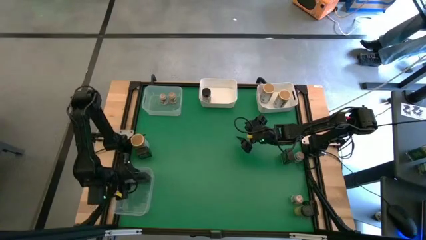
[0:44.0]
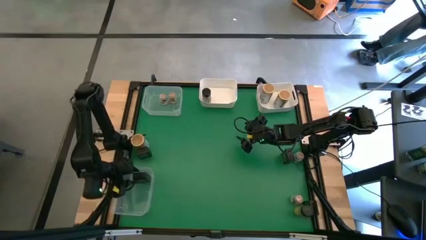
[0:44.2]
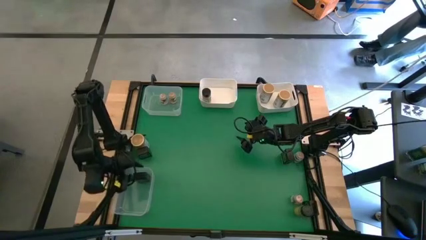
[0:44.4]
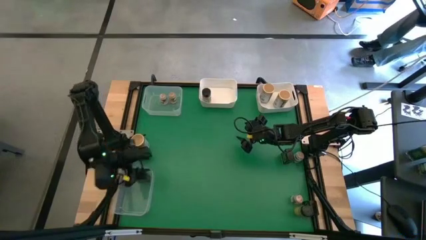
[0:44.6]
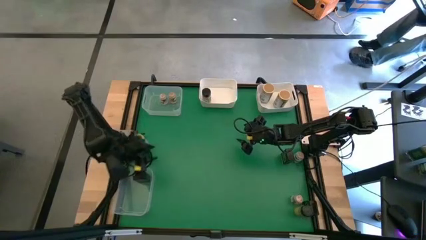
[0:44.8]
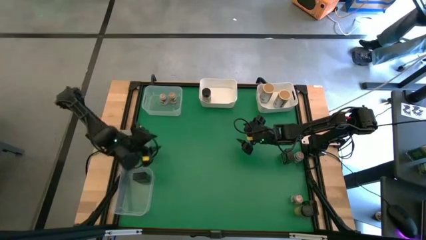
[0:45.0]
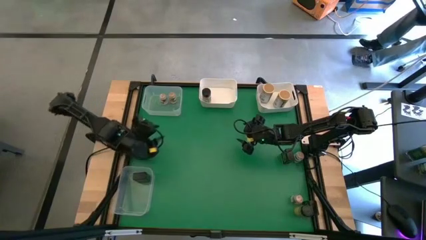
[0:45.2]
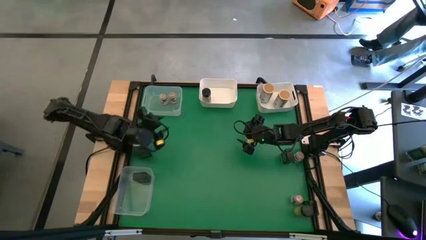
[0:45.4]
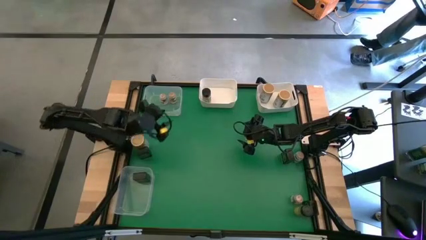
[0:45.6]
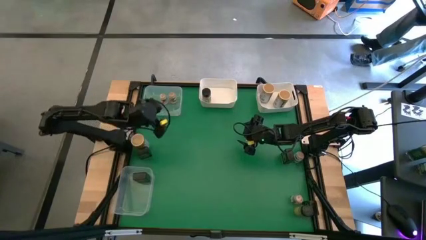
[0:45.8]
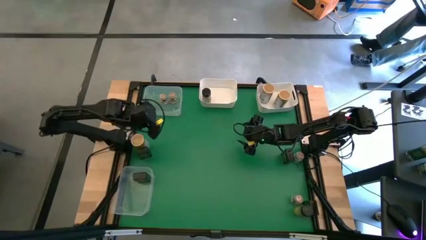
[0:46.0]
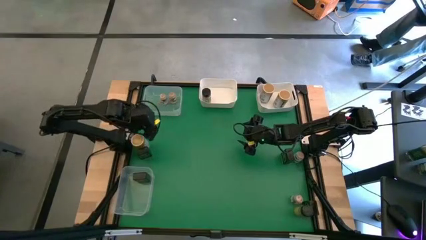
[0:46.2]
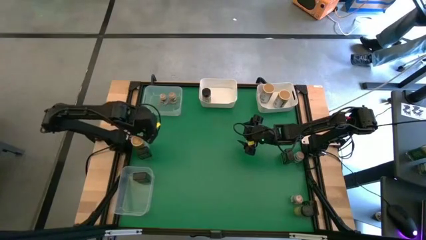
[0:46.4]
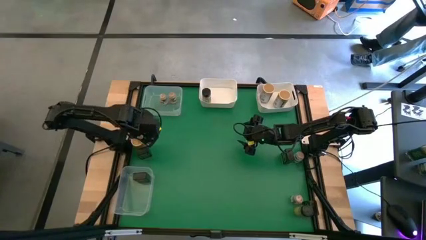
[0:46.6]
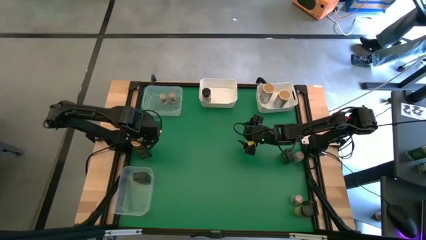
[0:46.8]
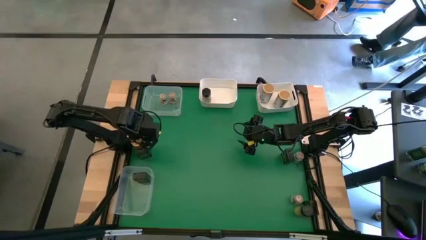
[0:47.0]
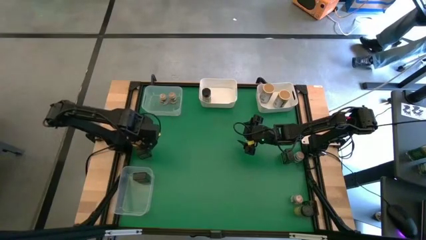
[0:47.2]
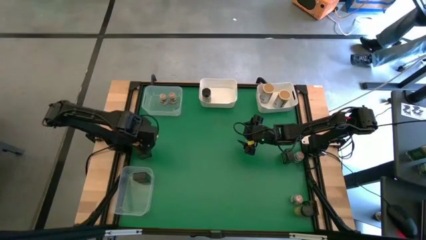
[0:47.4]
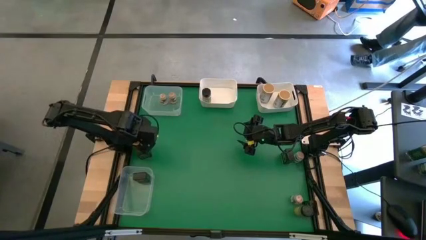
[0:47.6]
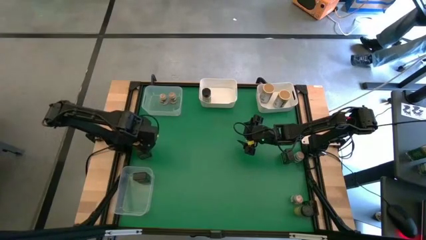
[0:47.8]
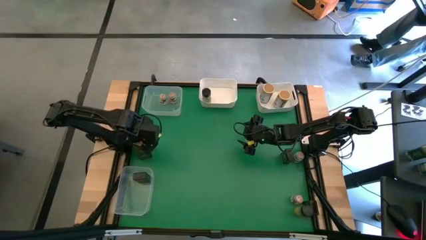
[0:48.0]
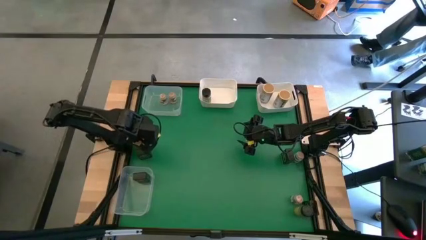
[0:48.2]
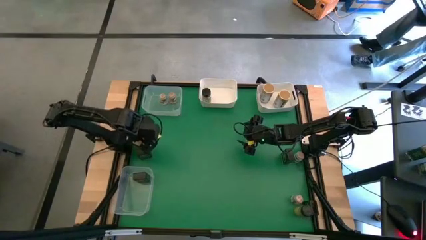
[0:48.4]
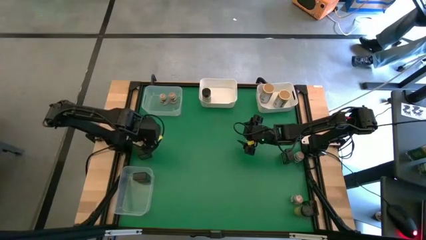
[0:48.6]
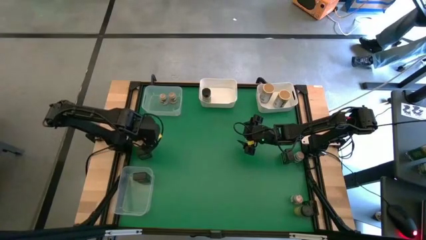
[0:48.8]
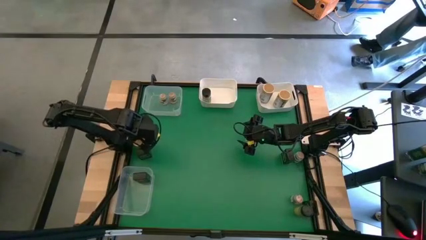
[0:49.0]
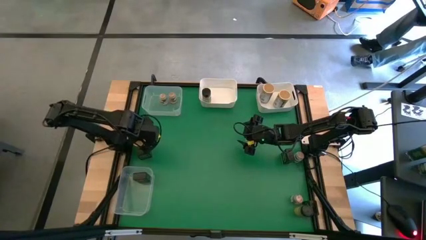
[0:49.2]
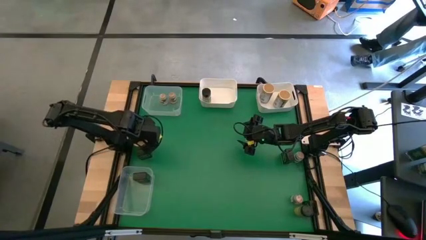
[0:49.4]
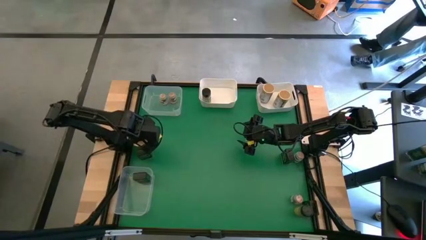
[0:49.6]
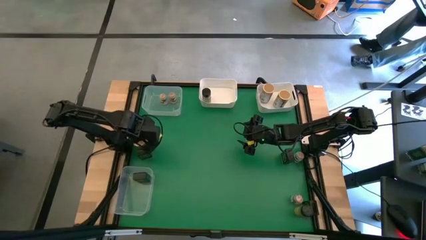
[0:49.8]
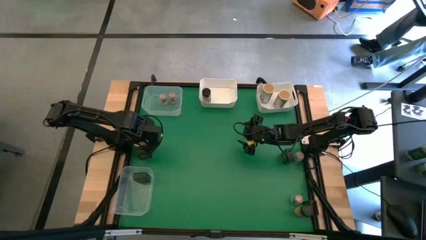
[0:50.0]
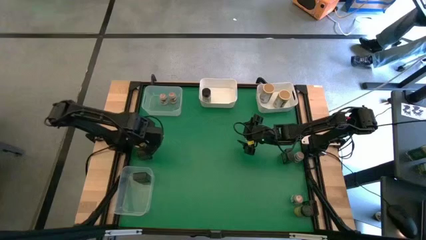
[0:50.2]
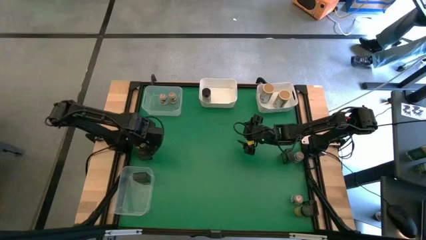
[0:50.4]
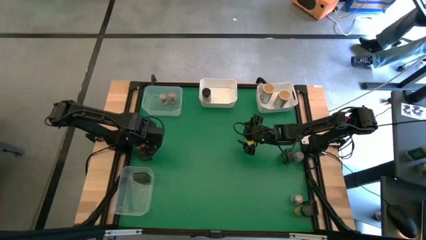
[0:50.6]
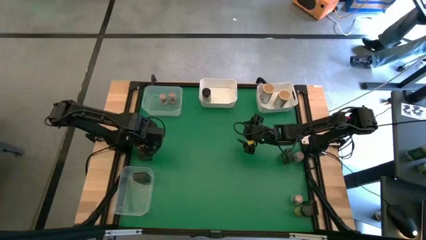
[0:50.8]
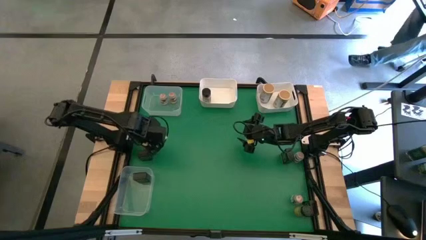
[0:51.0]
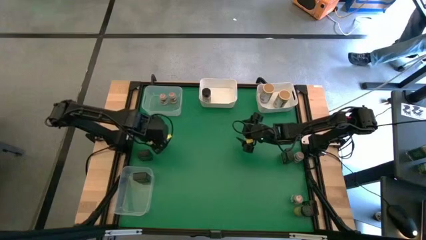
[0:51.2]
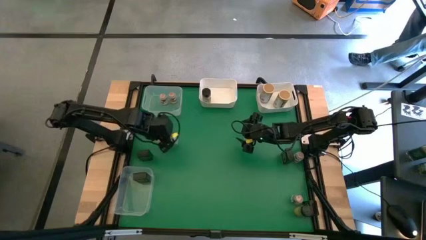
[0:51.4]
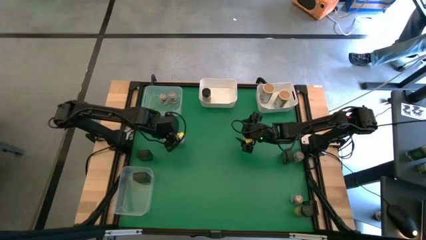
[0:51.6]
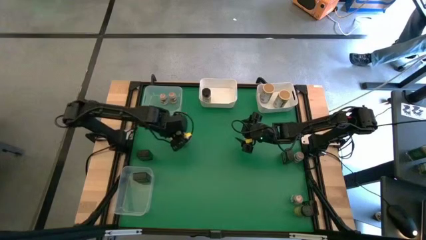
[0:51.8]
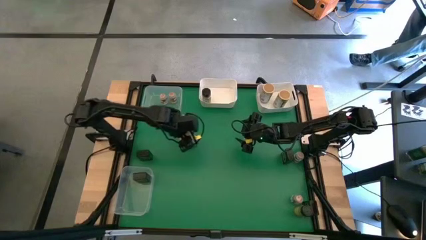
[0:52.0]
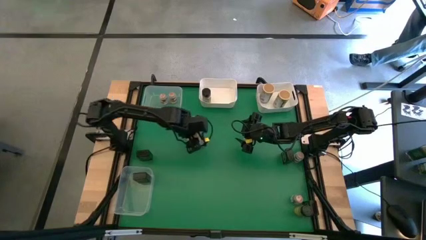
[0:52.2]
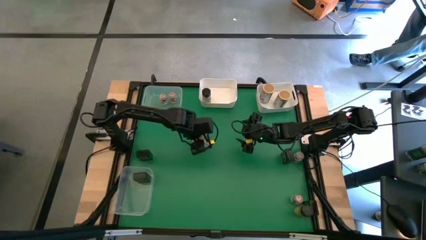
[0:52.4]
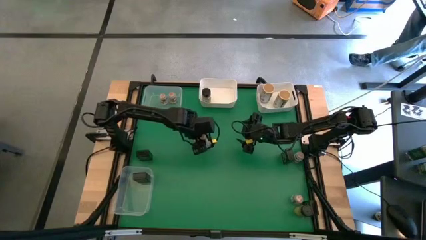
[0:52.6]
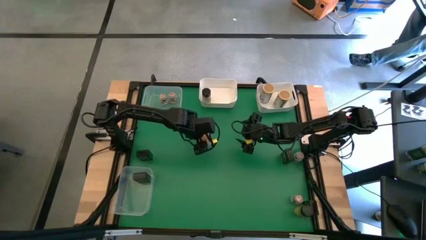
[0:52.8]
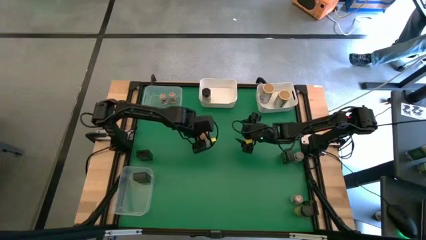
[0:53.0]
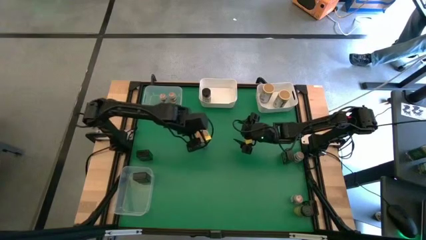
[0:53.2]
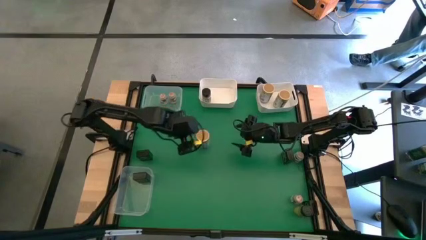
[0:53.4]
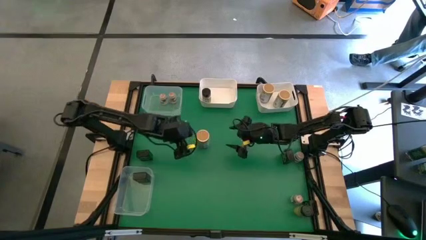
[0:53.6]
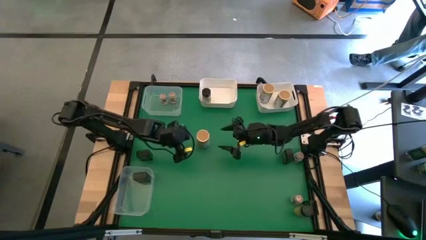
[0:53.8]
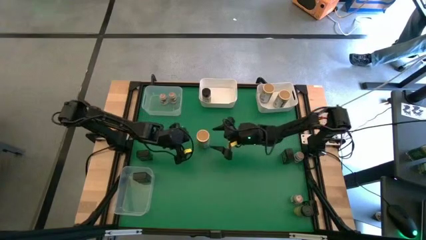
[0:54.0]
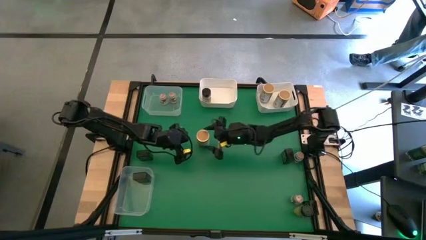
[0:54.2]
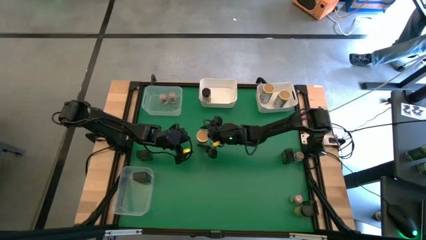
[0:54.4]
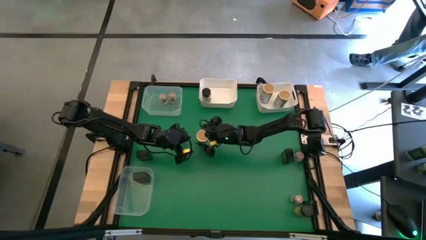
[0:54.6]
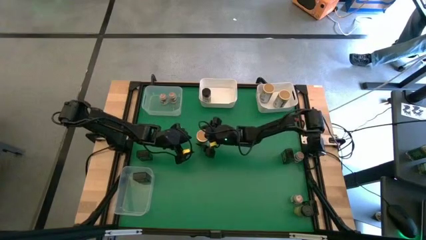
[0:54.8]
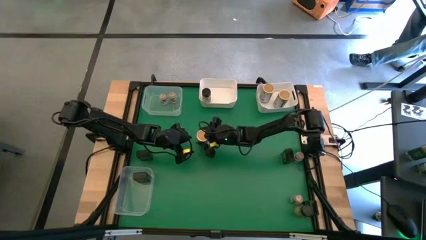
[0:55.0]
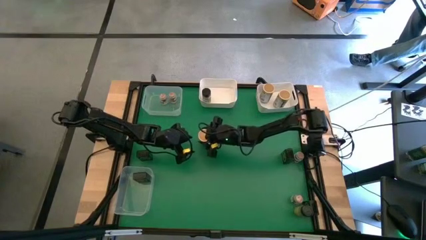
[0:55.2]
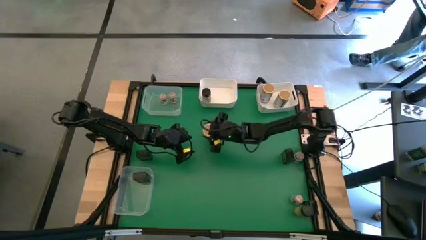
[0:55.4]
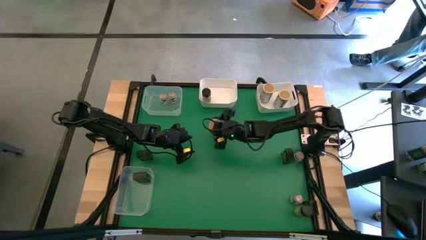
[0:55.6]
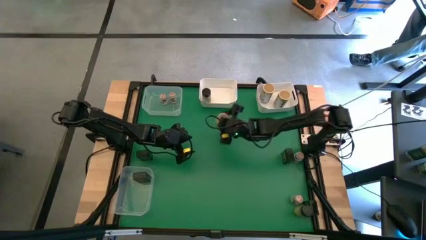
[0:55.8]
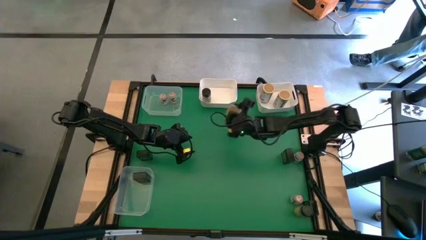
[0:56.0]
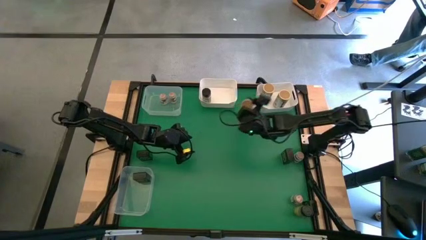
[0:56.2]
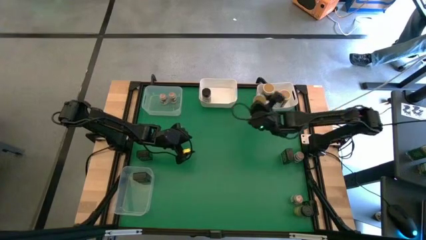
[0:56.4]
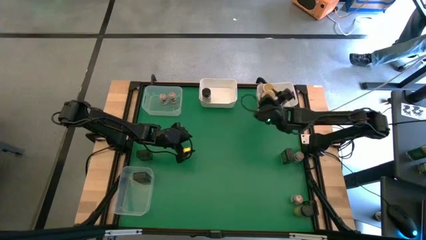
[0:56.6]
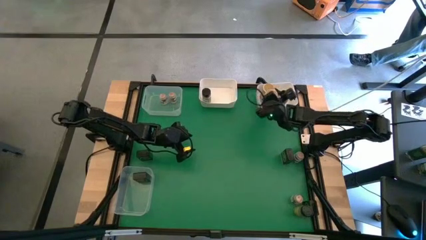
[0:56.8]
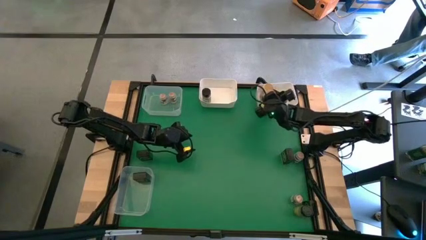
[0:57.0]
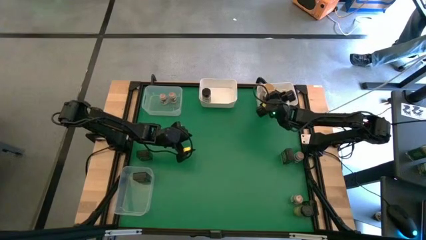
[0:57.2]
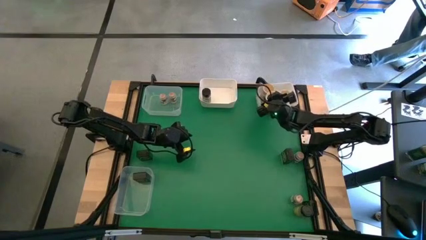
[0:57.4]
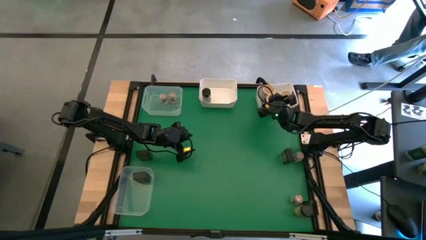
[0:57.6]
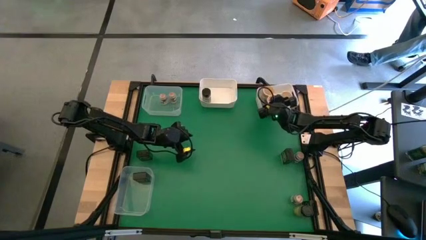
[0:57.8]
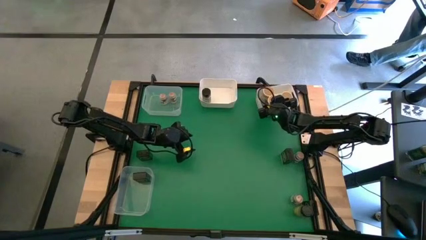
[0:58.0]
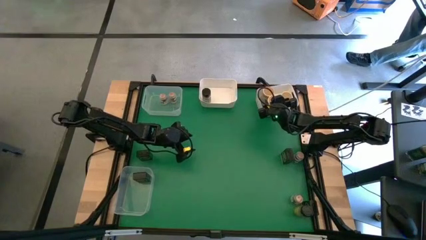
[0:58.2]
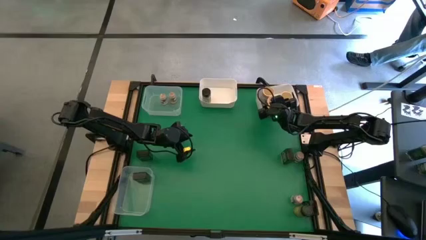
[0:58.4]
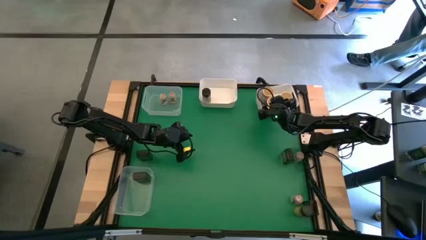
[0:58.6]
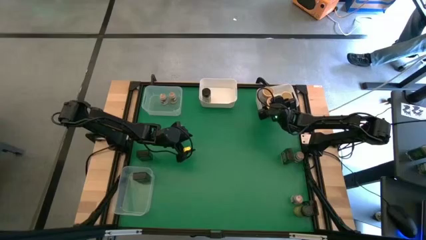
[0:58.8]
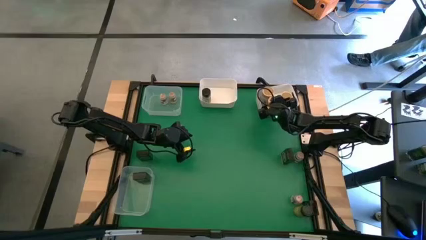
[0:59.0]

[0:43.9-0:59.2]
Task: Sort spices by type
Put the big brown seasoning bottle into the right white bin
